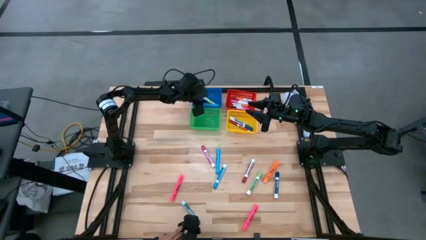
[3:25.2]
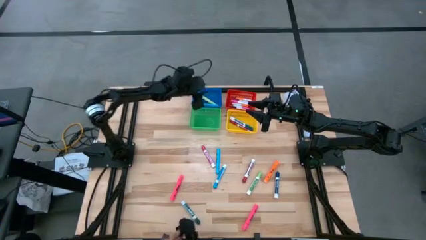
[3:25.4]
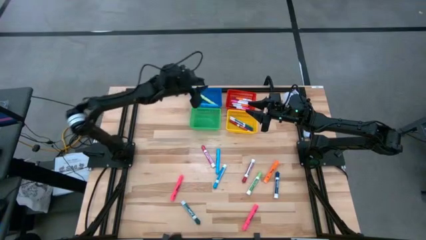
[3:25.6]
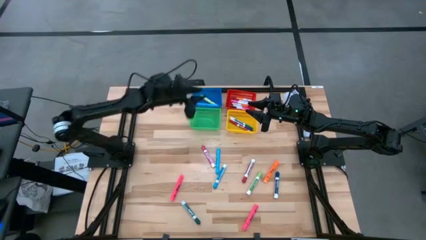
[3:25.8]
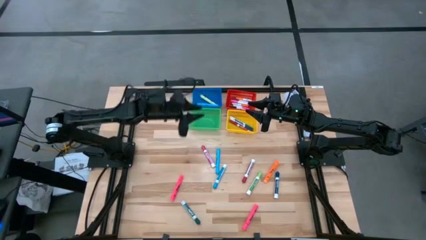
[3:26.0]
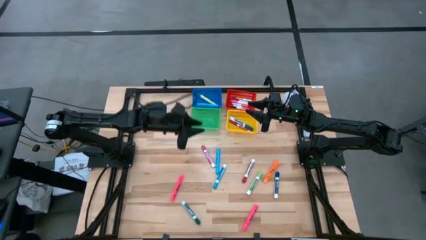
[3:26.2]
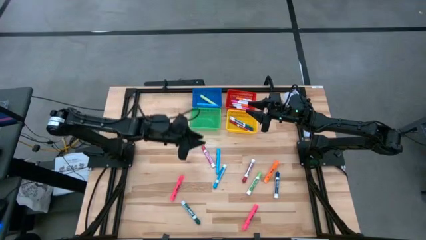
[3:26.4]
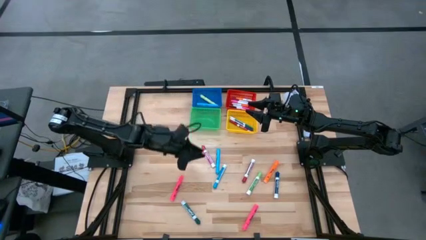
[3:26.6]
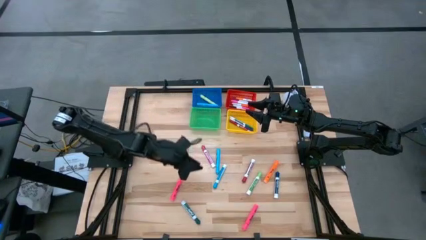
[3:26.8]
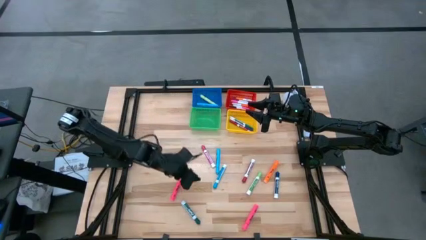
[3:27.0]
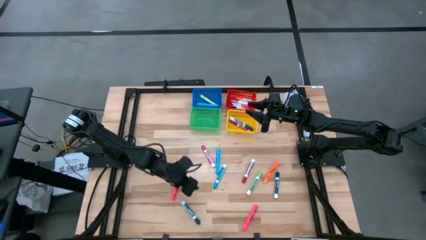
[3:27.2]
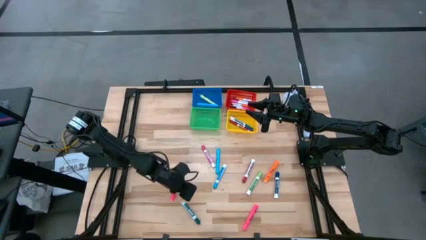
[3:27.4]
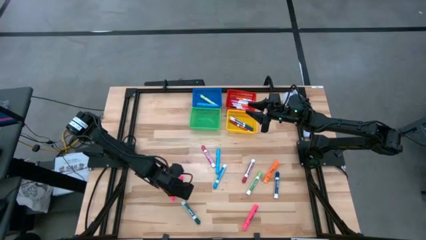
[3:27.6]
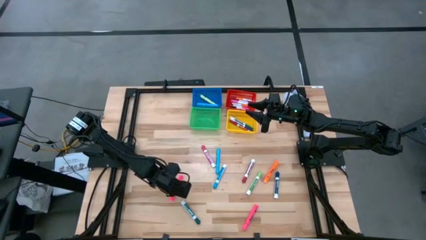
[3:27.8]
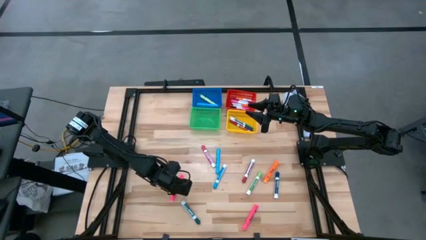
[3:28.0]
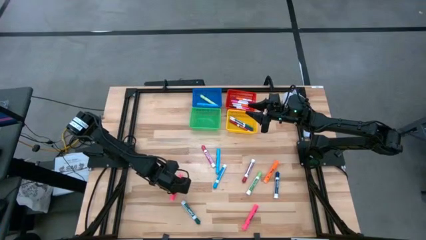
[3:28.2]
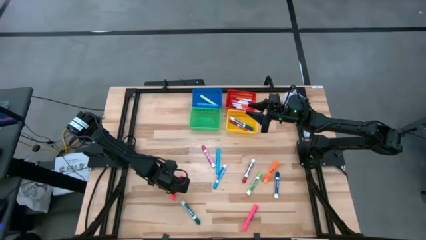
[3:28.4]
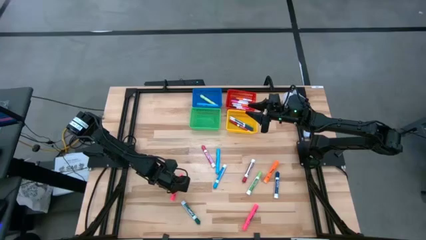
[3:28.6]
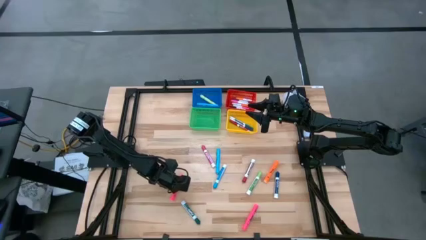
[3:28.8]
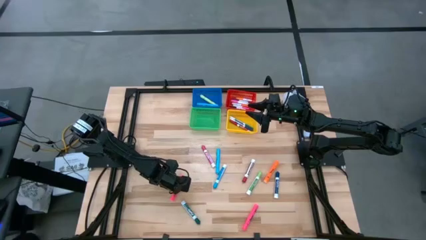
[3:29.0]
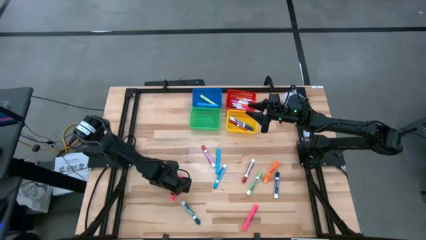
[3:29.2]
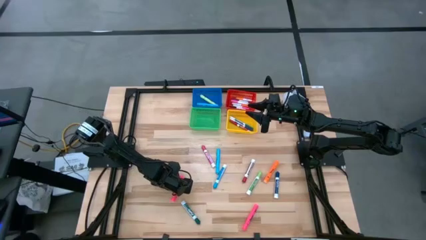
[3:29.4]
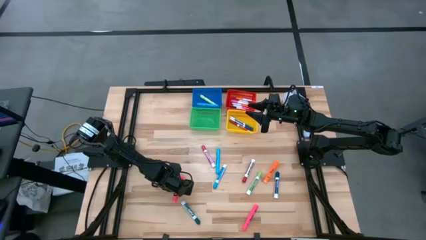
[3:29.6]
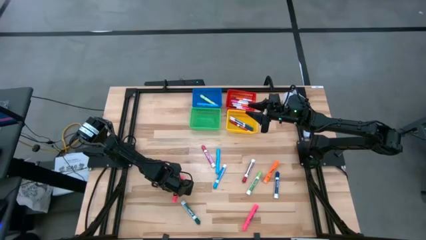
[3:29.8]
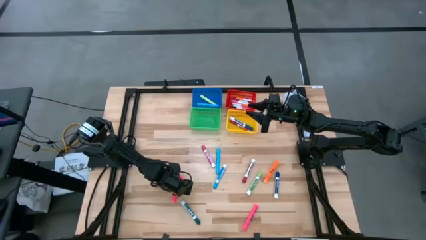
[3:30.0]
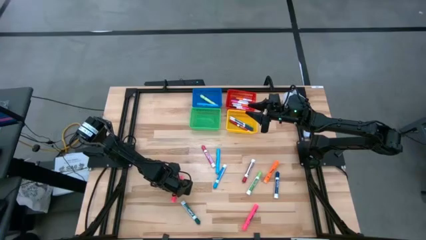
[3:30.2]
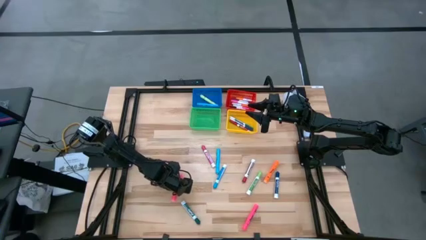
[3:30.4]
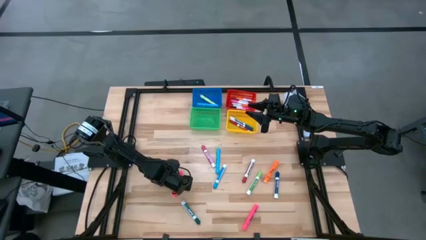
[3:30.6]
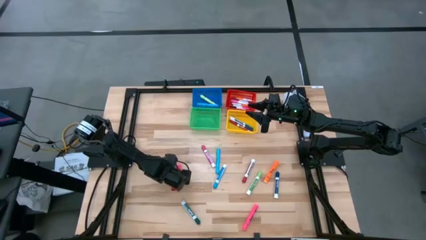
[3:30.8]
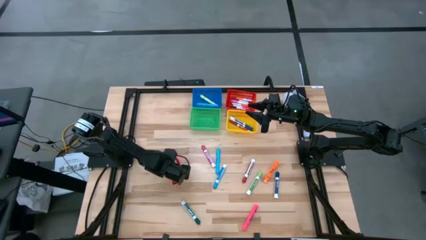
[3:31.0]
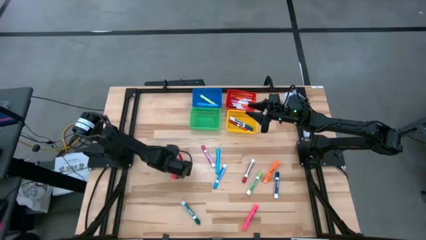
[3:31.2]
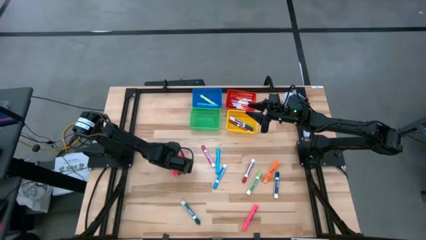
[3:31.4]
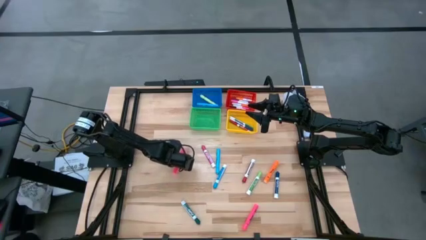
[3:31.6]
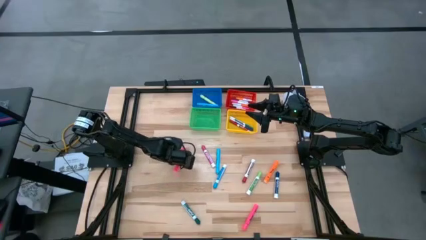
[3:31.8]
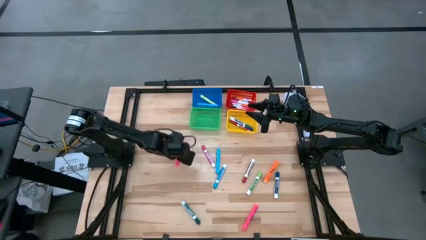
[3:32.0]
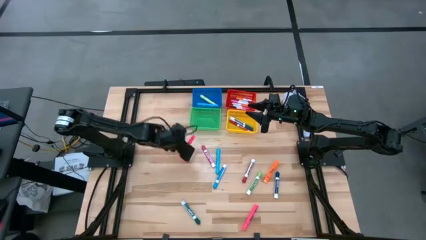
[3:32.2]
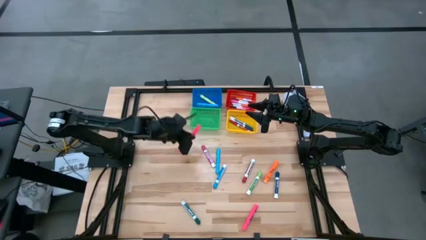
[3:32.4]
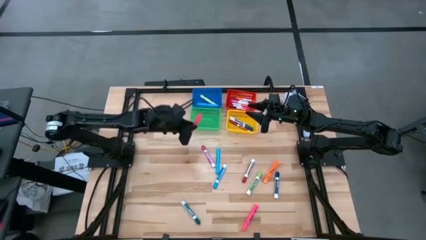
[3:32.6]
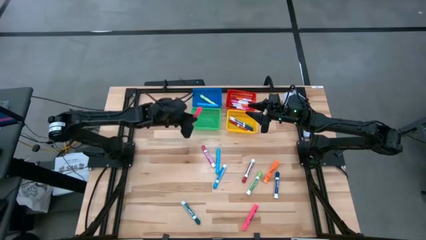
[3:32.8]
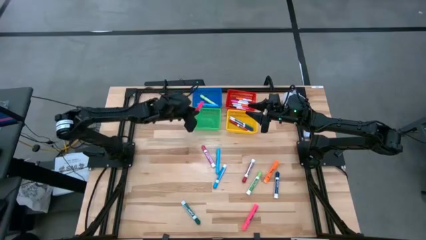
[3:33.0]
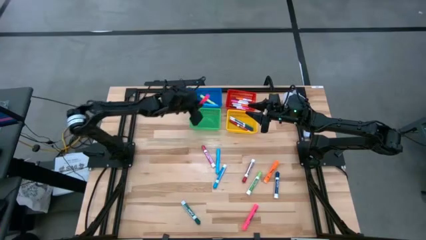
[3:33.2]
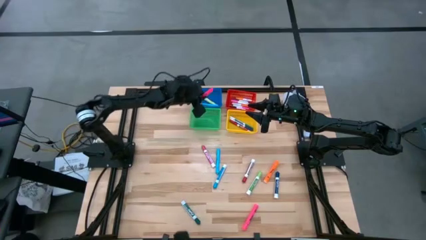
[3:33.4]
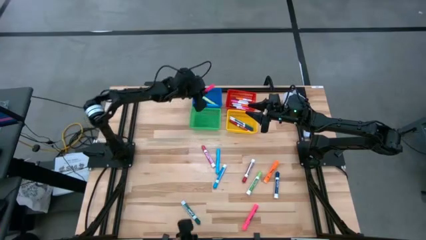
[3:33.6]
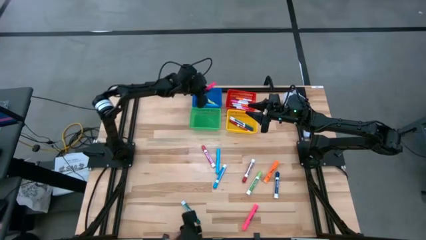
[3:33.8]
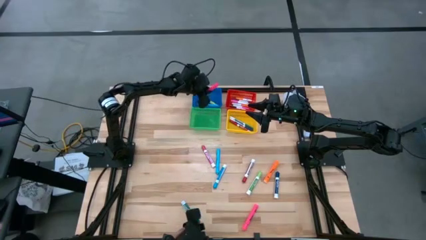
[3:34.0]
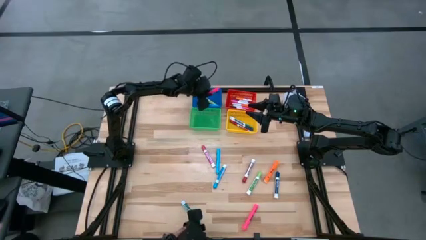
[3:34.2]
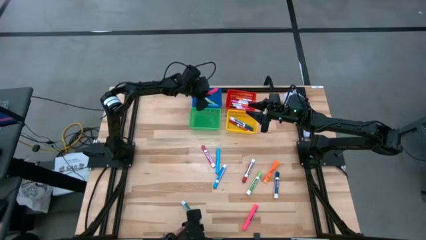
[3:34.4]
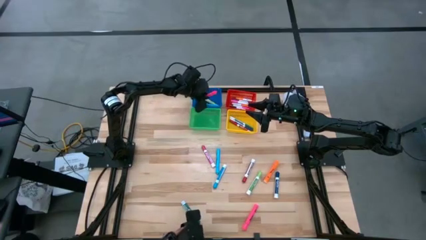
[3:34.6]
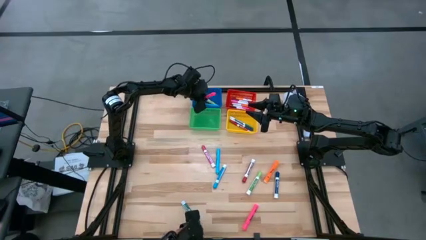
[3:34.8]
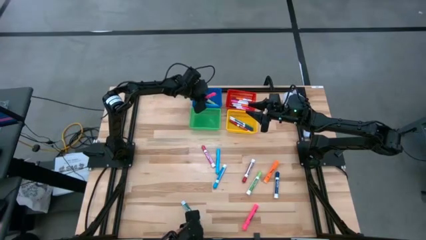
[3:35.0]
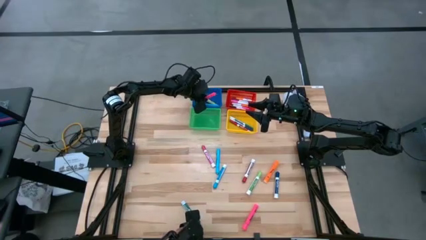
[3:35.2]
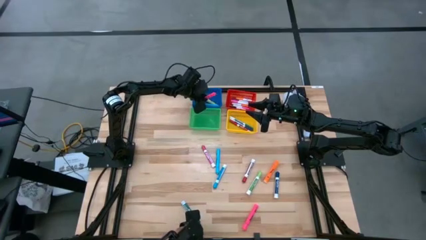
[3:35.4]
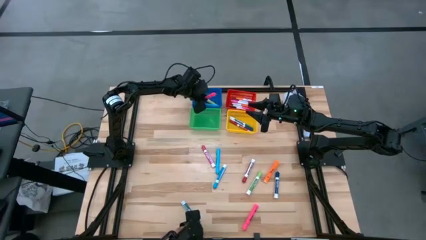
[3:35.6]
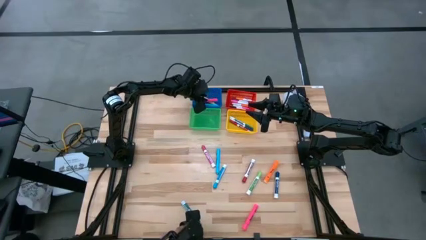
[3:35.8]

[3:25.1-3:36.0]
Task: Pick & Place Markers
Put the left pink highlighter into the blue basket
